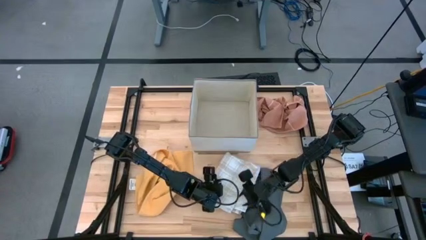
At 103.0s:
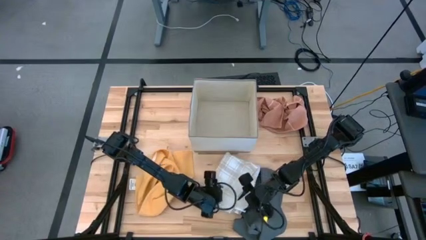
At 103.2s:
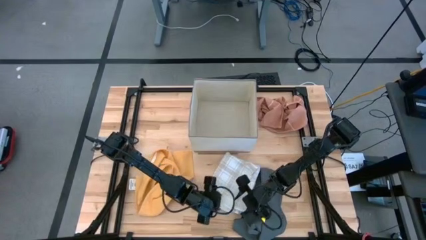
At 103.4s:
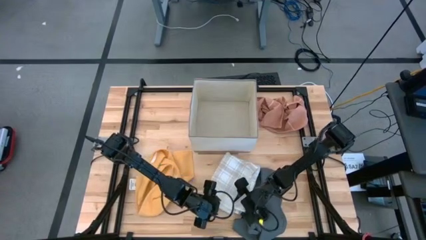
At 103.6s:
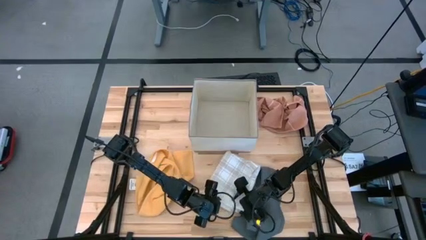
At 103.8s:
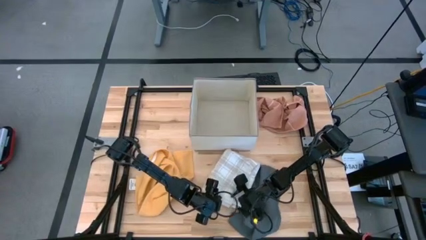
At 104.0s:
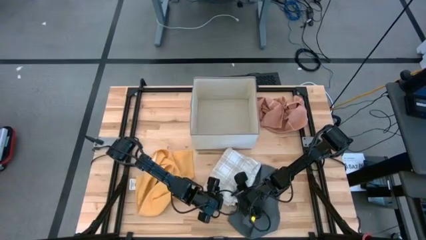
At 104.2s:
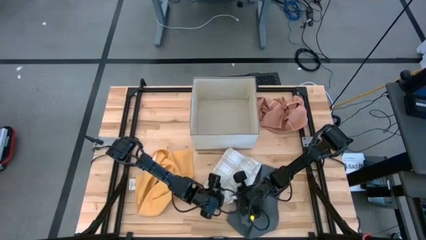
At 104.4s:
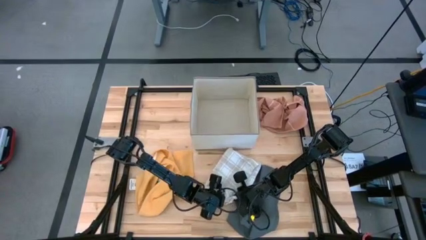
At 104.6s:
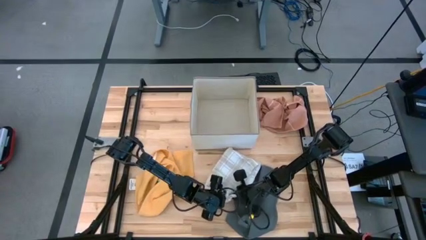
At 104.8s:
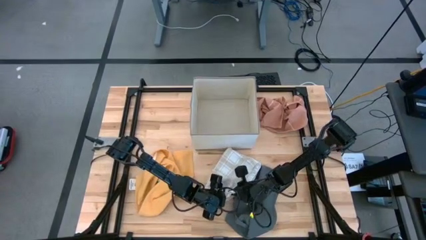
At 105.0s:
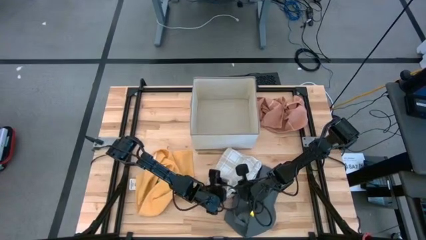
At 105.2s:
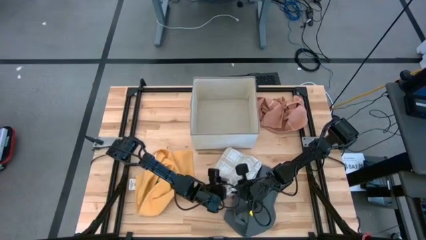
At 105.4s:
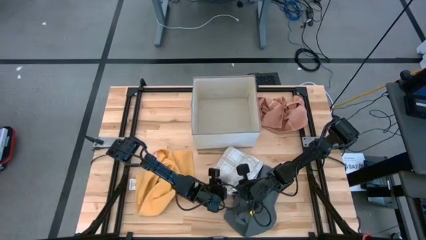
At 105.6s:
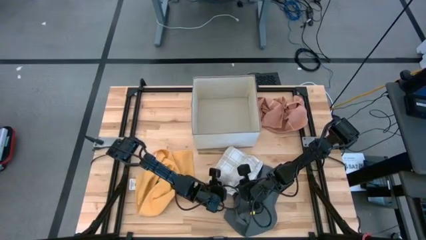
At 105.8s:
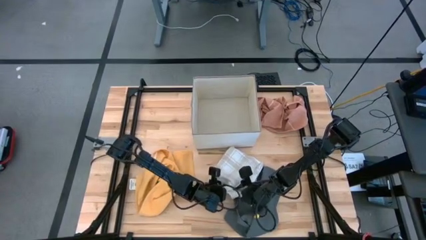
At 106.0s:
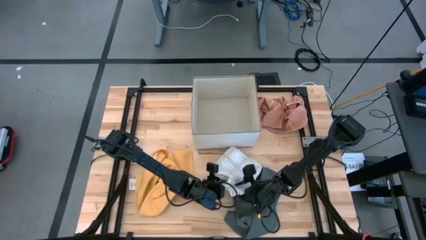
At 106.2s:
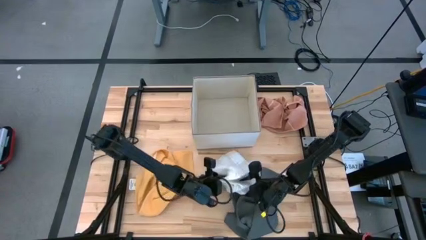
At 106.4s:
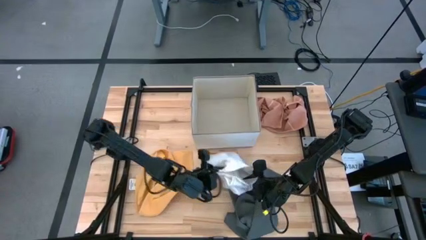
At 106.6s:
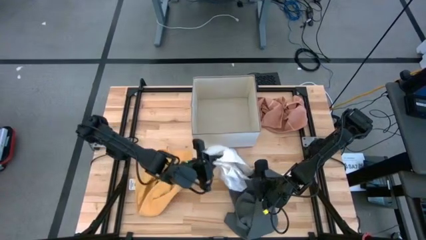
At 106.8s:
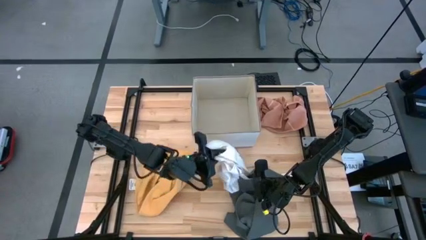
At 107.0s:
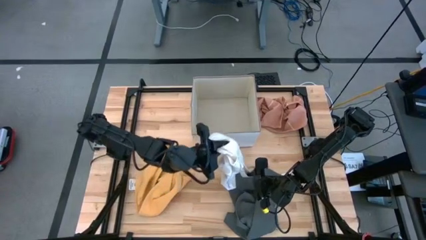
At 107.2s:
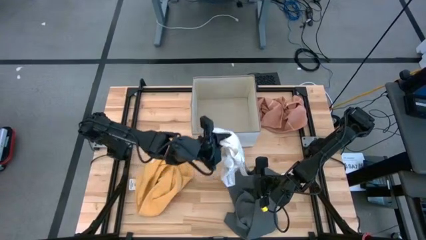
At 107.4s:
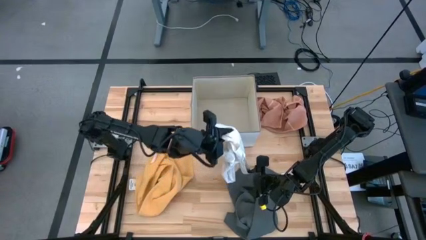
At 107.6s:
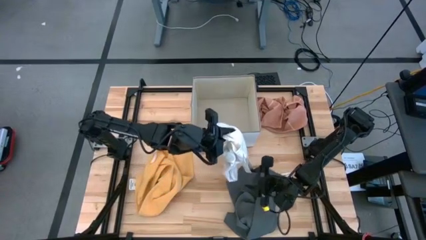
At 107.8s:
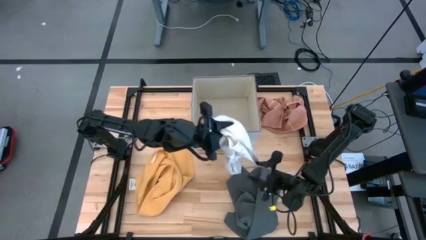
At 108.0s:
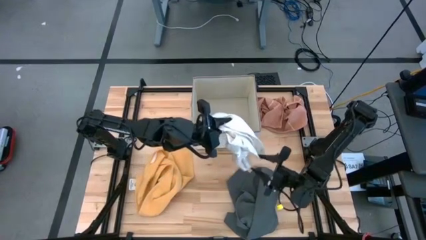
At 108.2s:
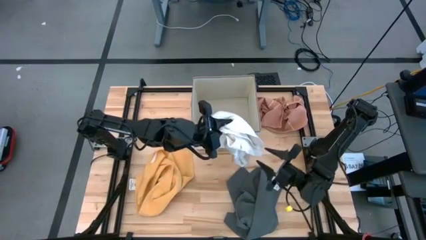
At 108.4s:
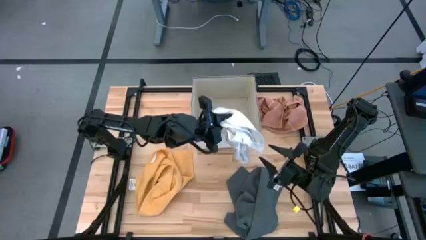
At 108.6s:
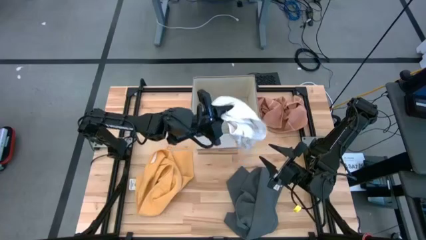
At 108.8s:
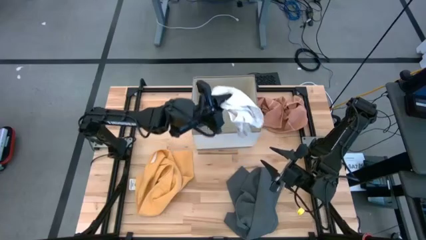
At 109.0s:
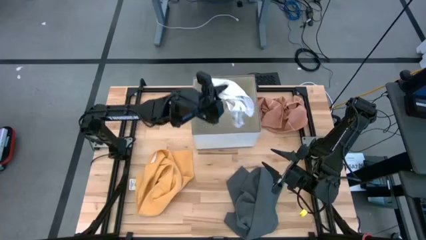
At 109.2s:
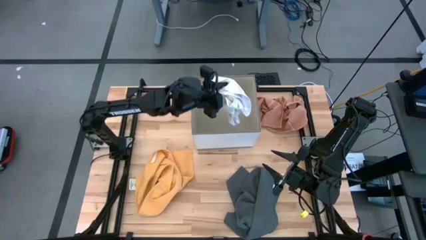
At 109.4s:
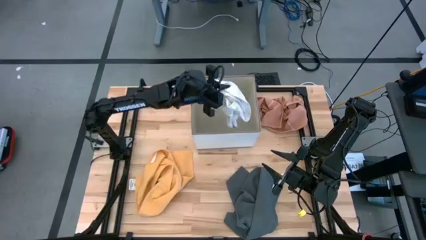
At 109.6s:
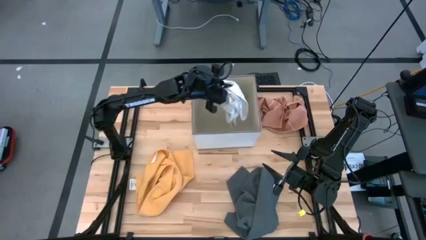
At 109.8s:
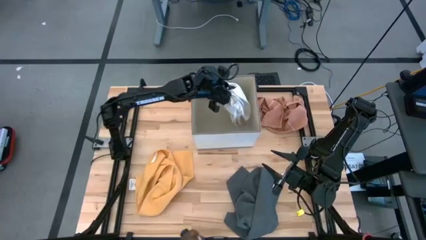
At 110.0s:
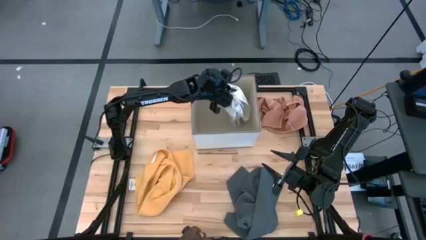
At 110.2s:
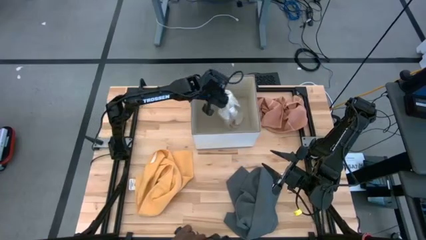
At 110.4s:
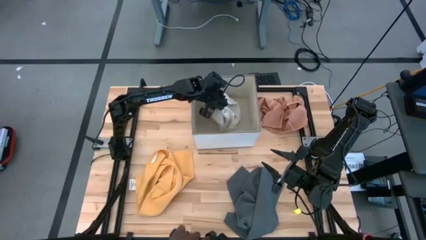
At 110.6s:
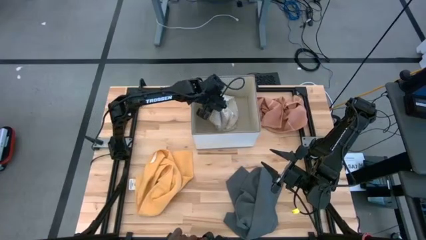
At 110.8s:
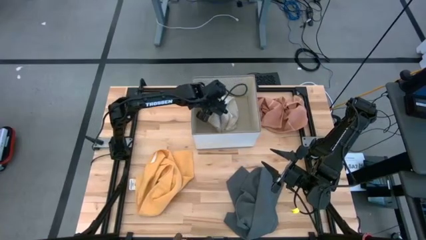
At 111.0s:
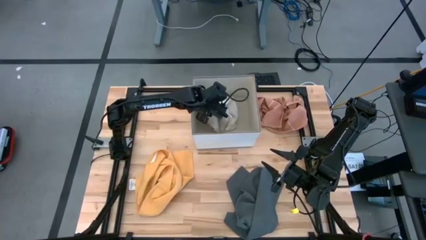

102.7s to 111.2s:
Task: Fold towel
Put the white towel with brown checkered lines into the laundry bin

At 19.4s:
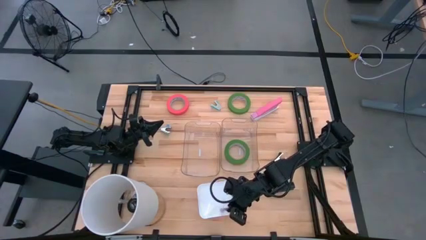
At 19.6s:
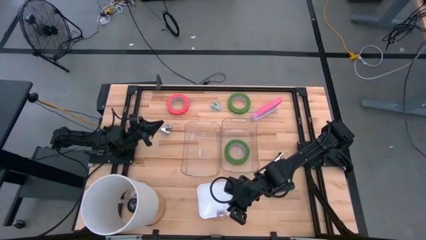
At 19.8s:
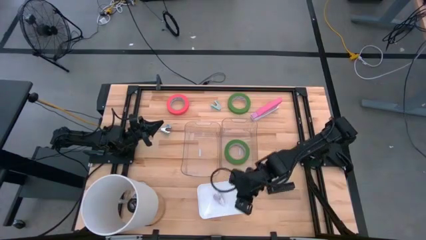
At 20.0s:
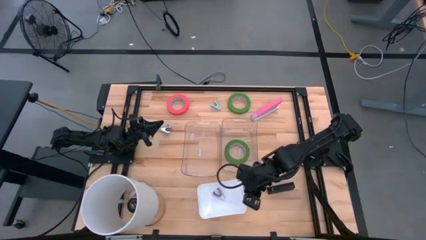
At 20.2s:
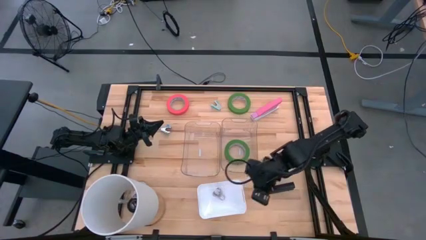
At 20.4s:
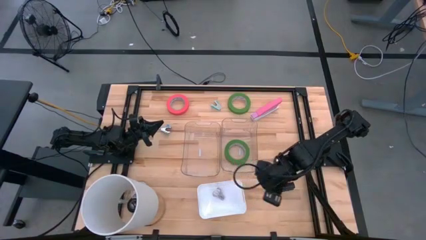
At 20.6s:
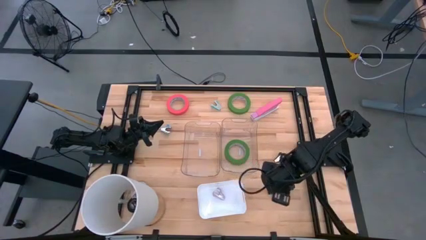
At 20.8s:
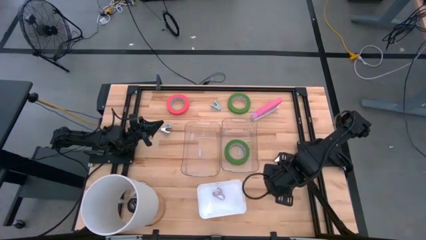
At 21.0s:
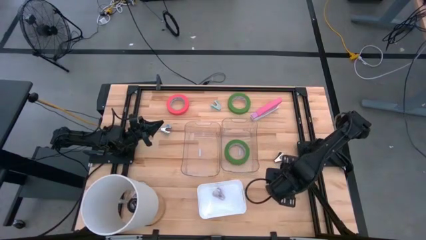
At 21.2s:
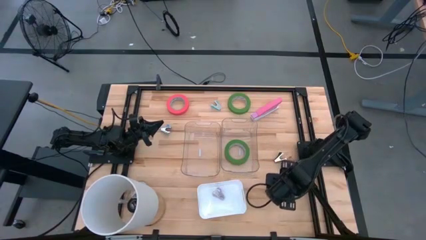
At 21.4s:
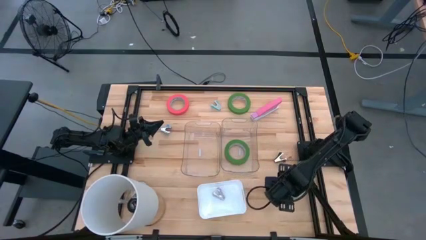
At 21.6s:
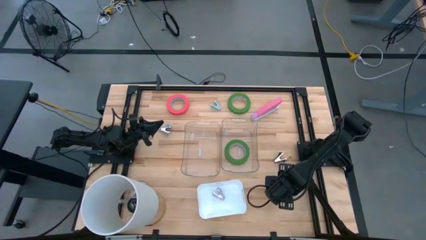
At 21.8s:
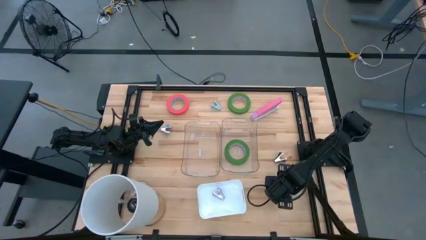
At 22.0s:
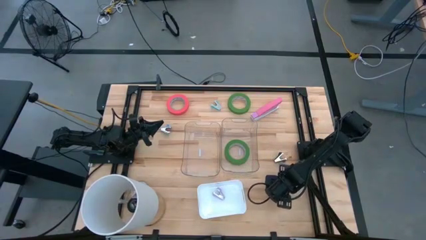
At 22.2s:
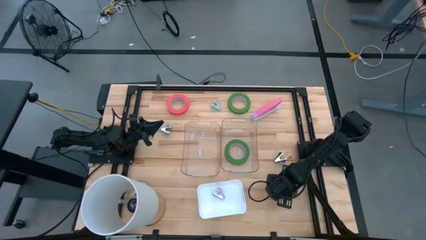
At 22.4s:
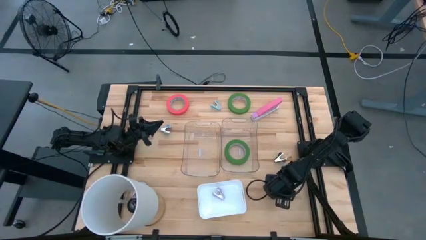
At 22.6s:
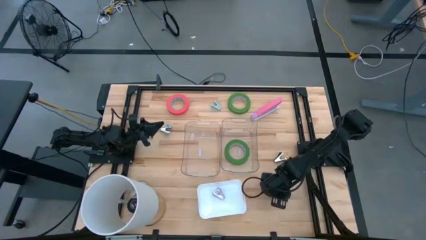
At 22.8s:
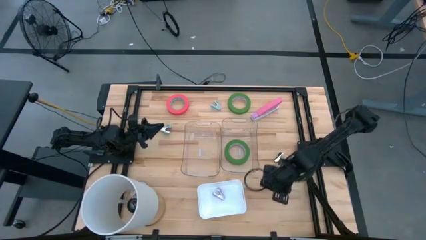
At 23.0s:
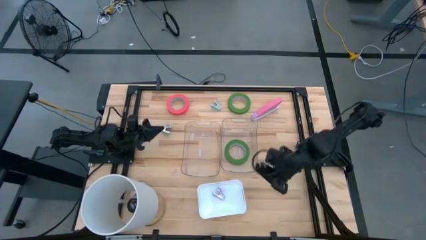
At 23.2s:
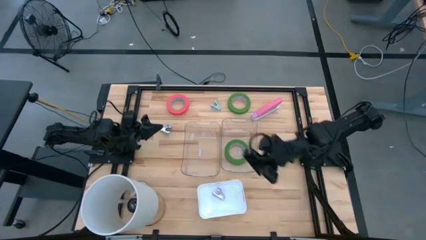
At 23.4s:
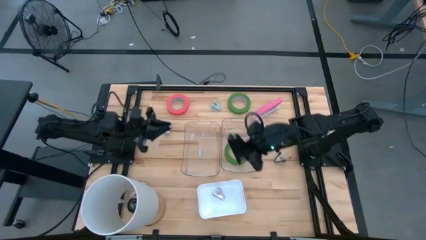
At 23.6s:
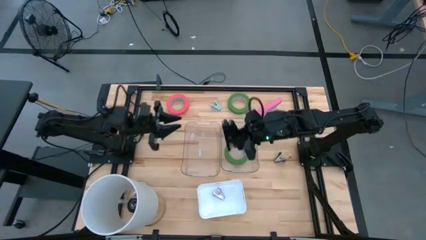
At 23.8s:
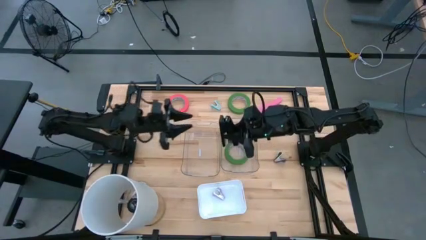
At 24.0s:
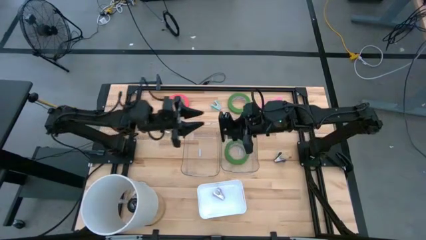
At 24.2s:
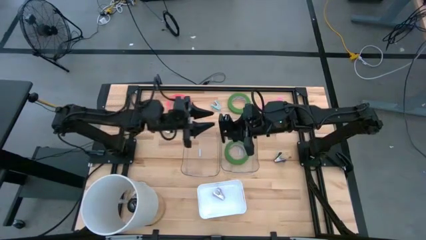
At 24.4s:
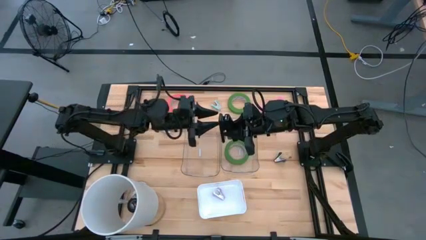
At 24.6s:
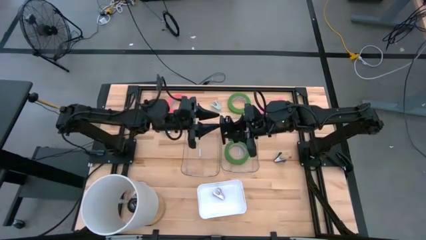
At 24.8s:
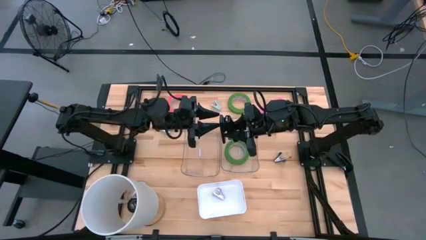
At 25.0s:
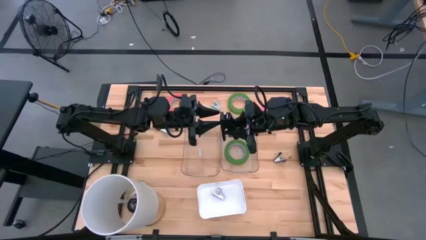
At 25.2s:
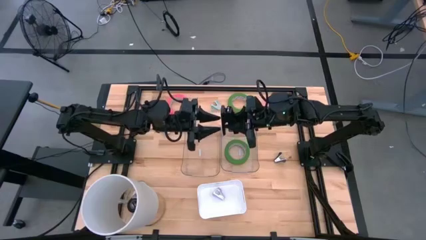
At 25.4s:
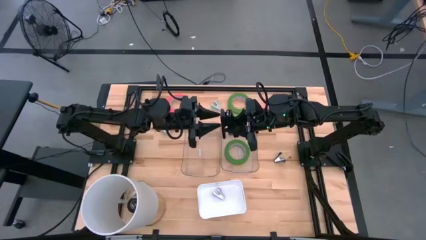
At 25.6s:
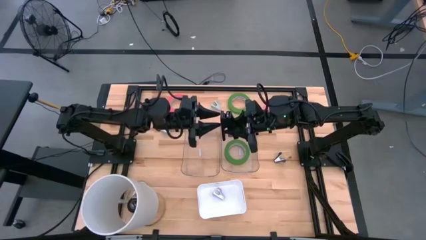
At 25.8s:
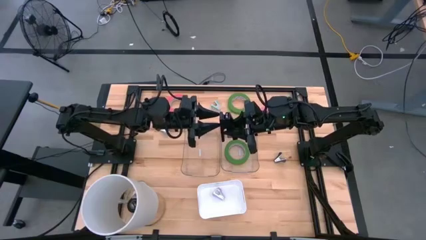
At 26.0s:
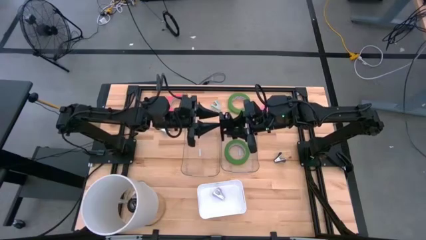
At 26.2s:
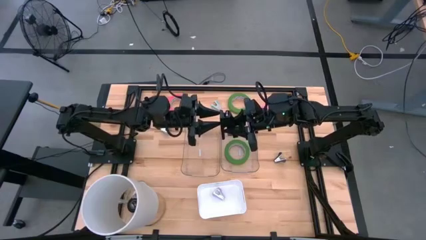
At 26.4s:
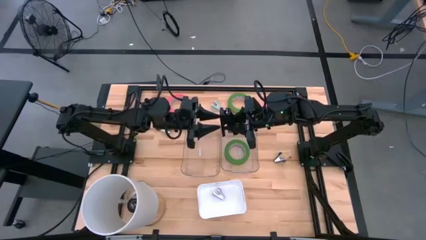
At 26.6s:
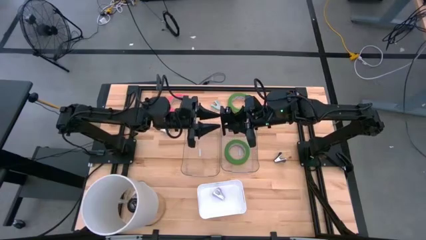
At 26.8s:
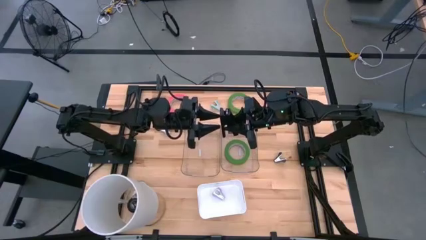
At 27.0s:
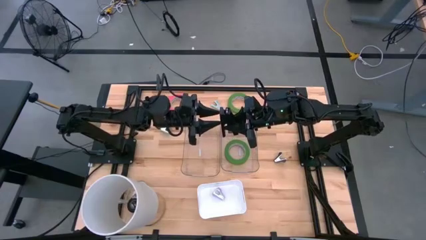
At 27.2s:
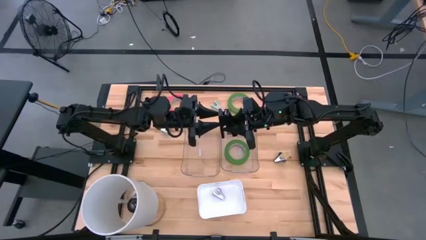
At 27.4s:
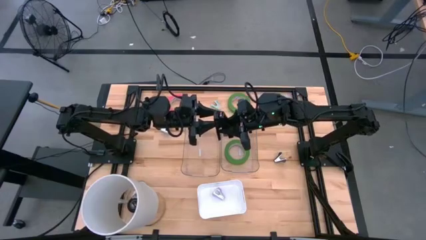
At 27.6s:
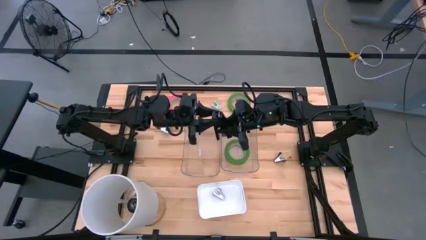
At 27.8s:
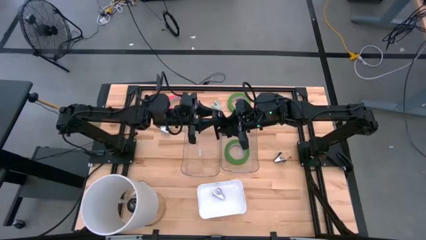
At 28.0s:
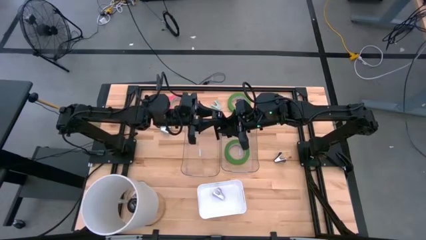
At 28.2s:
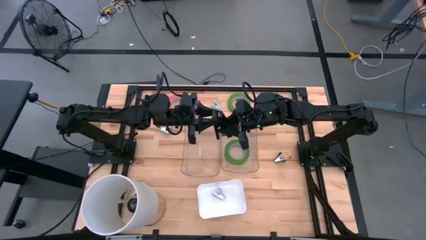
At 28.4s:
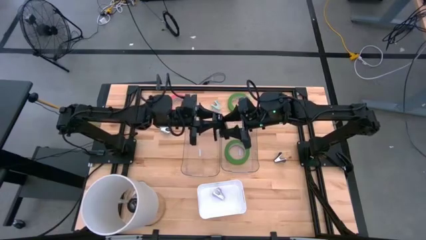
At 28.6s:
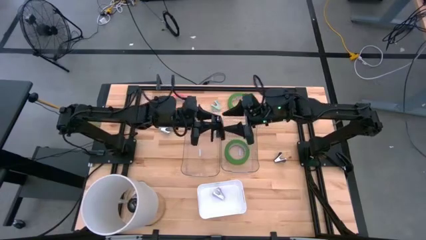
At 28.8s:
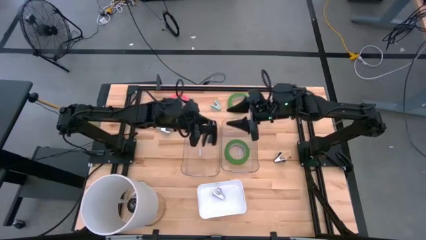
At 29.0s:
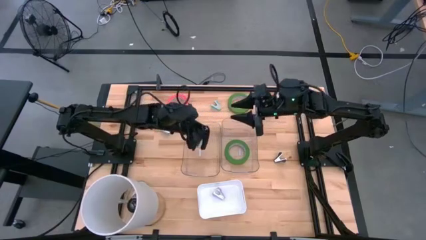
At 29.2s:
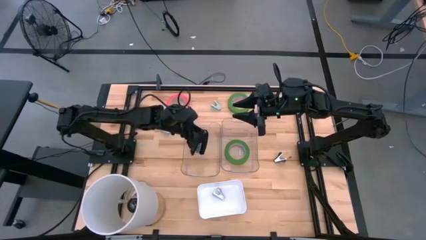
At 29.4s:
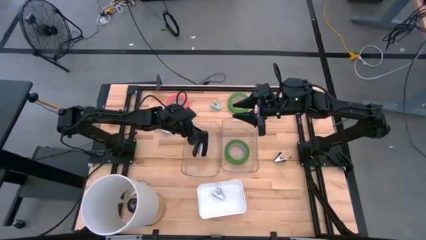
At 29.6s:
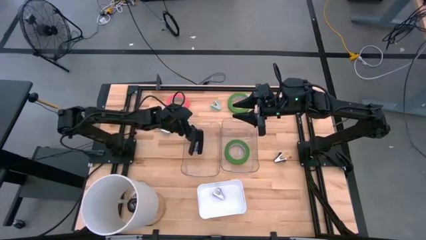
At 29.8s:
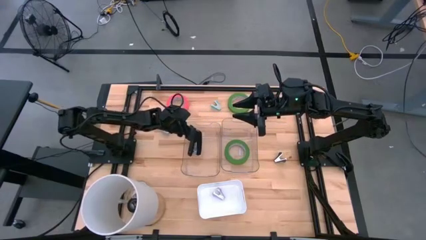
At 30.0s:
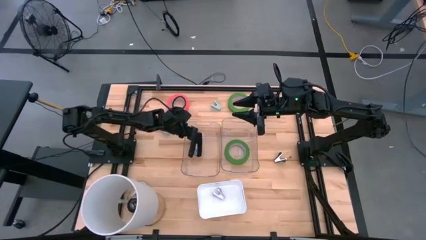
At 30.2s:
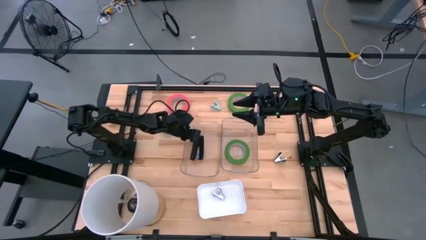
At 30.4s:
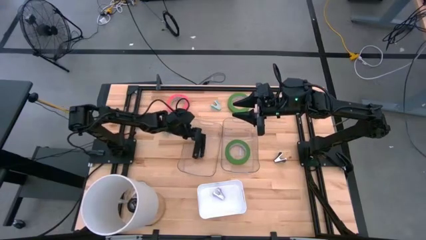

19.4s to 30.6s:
Task: Pick and place Stapler, Stapler remover, tape
Put the black stapler into the left transparent bin
